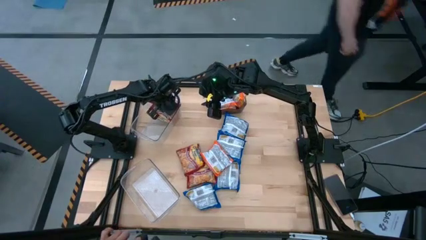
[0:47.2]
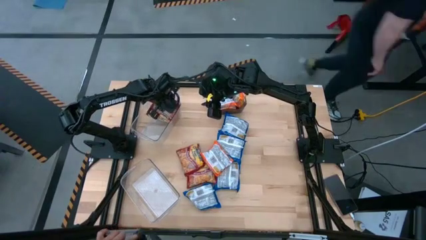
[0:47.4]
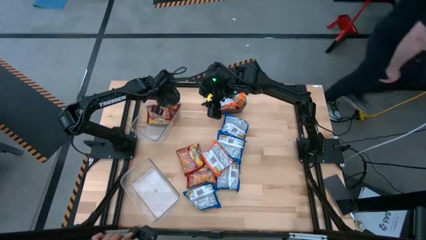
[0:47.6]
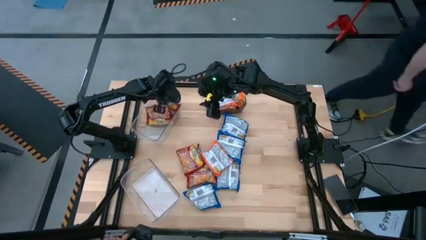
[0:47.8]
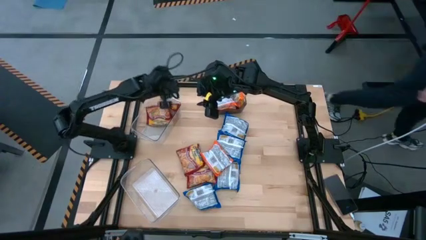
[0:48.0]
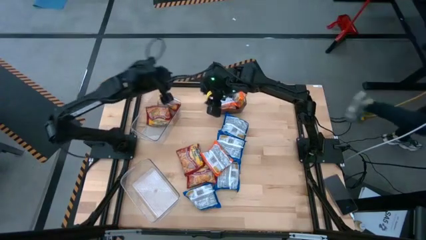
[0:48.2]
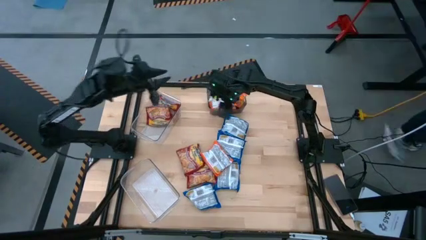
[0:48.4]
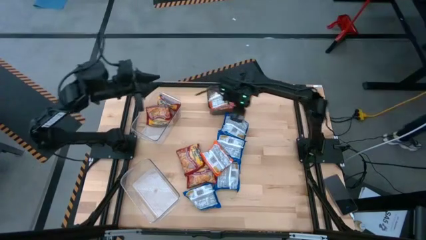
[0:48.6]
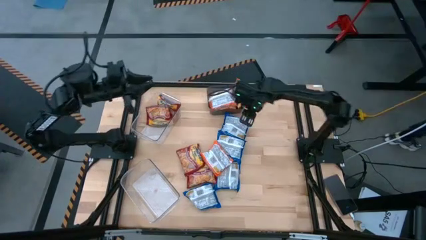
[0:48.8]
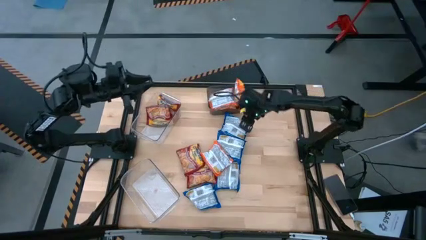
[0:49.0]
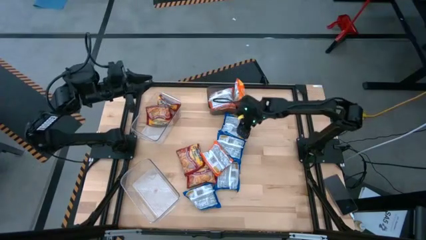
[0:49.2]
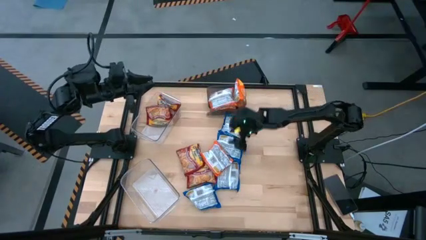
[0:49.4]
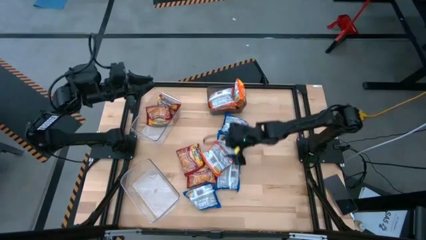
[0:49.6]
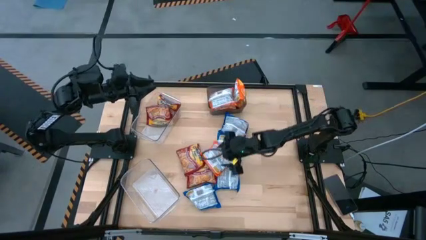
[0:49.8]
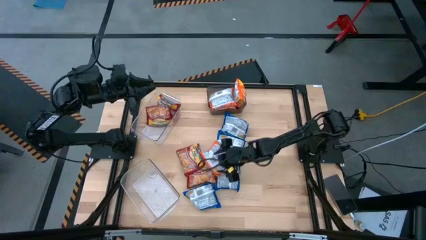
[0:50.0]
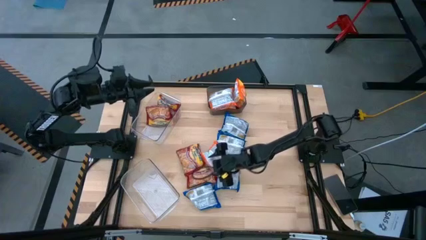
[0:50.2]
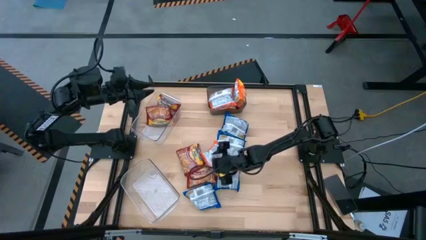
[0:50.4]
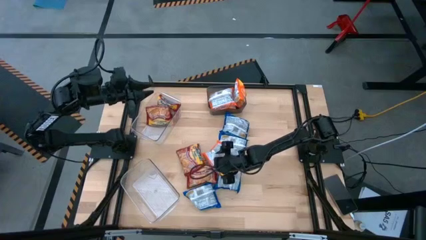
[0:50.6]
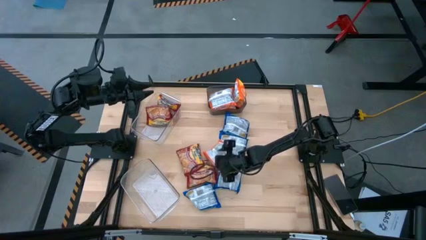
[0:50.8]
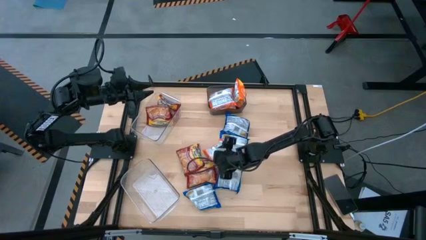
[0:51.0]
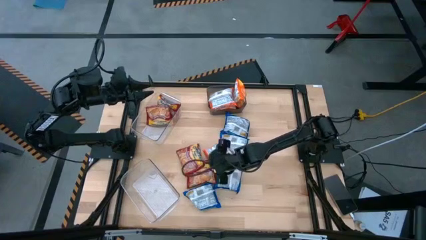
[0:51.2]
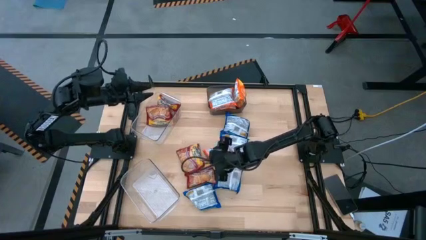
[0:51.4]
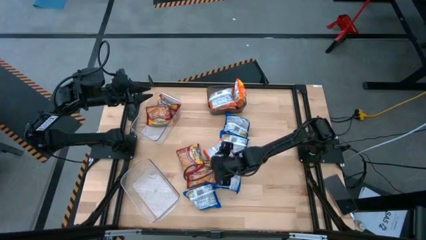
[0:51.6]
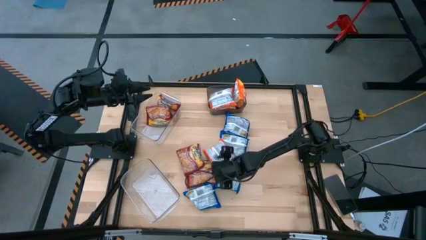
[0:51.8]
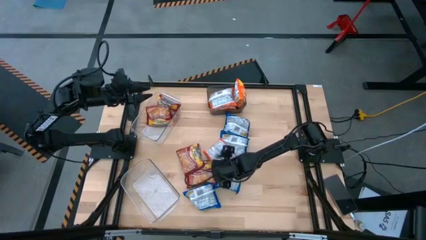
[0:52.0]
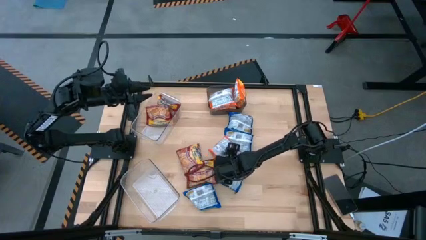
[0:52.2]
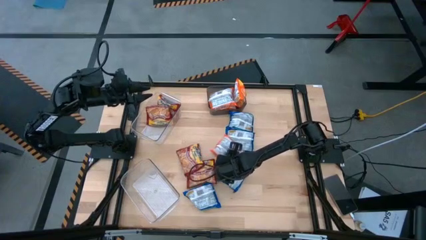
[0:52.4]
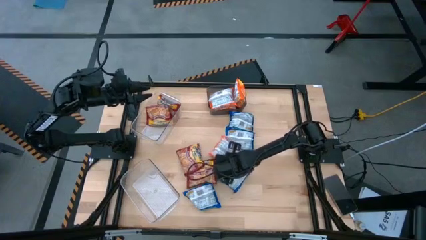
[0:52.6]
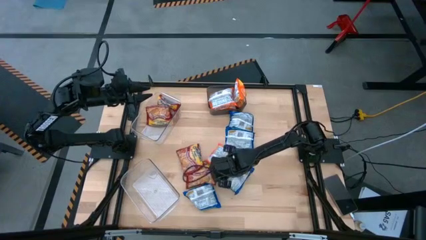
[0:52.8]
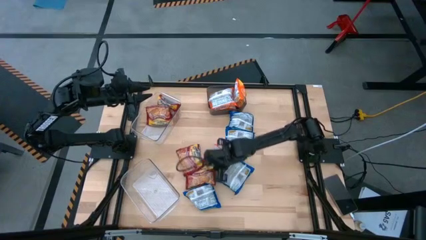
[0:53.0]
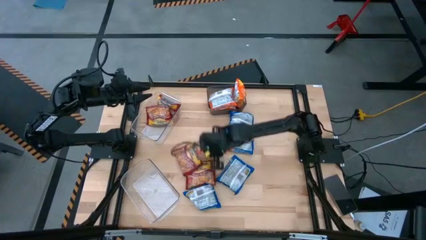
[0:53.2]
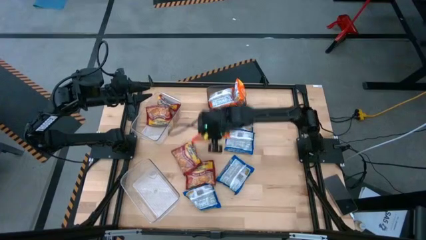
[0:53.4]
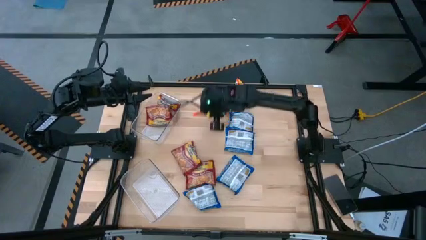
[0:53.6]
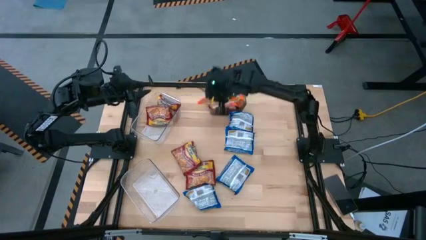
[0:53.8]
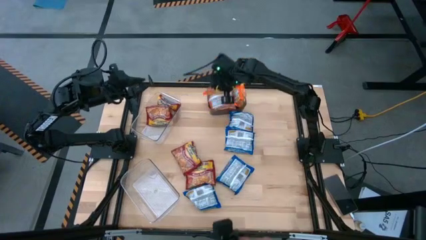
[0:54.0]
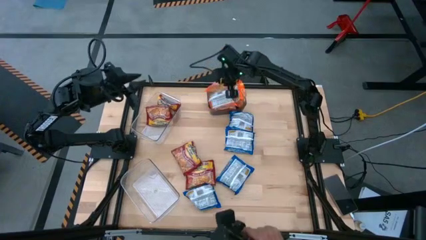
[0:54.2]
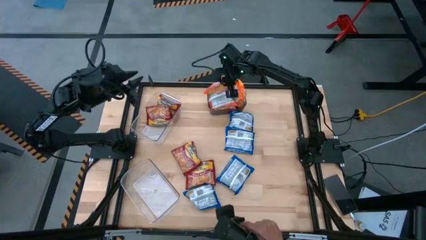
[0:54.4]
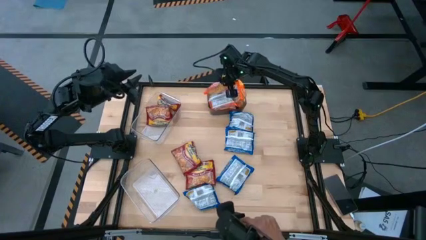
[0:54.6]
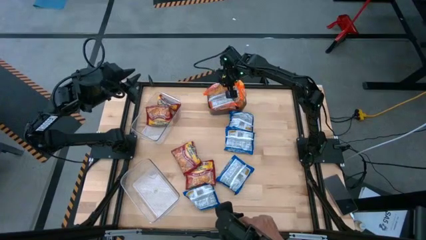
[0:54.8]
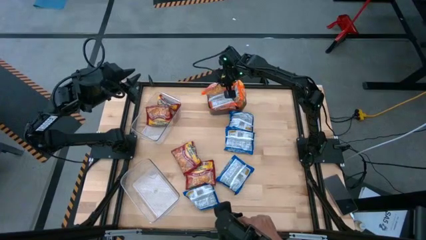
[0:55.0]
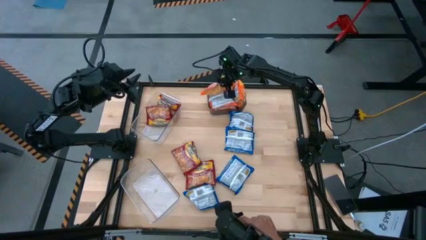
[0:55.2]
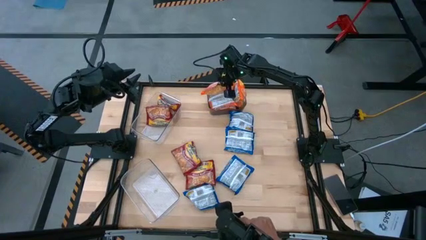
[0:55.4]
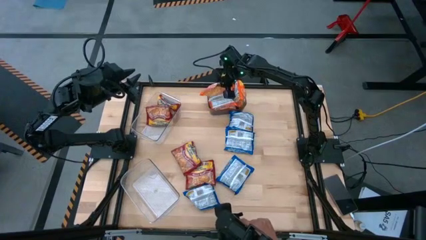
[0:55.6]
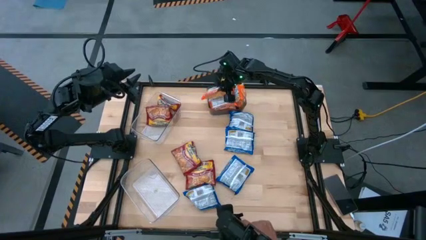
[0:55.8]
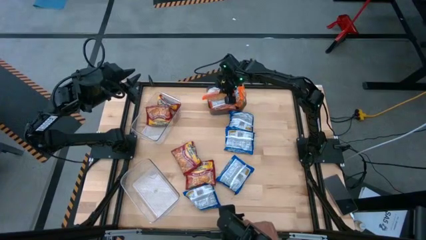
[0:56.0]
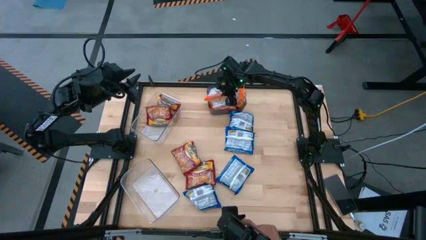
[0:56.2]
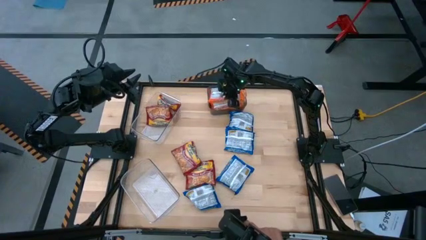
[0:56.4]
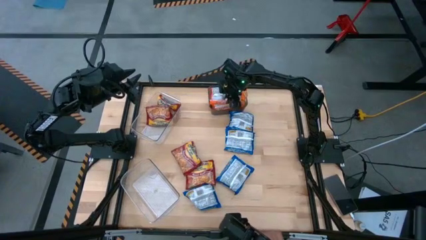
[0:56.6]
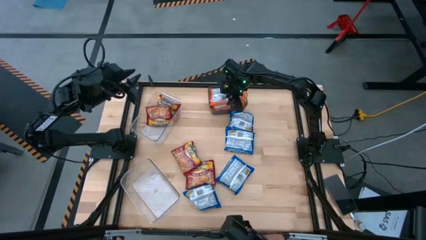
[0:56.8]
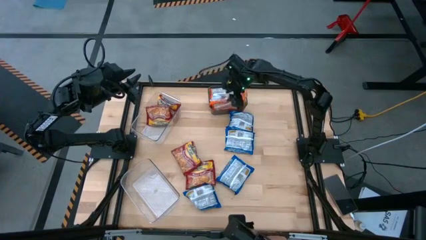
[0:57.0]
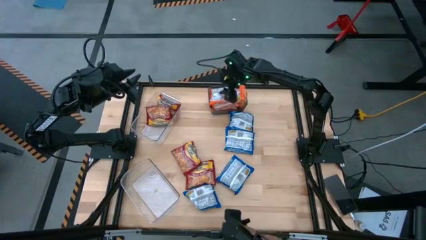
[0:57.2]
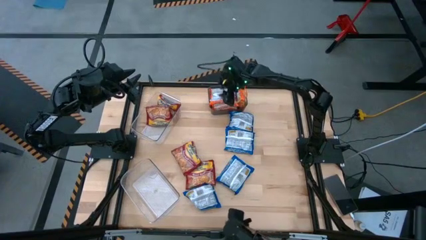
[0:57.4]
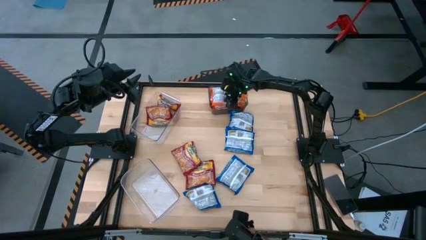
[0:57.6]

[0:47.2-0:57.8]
Task: Sort Maruchan noodles
Put the orange noodle pack into the black bin

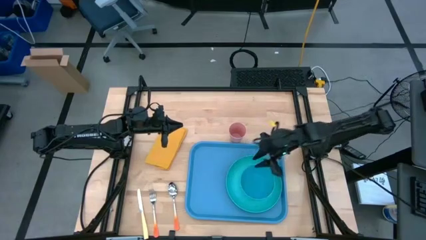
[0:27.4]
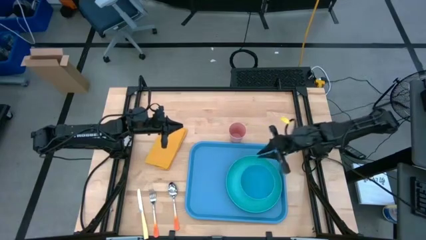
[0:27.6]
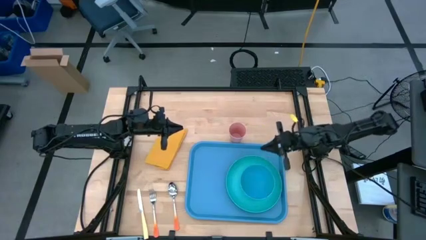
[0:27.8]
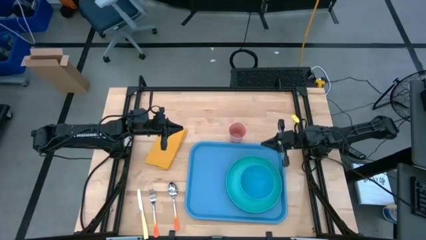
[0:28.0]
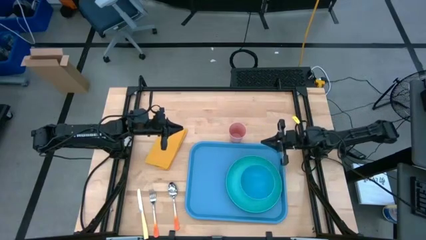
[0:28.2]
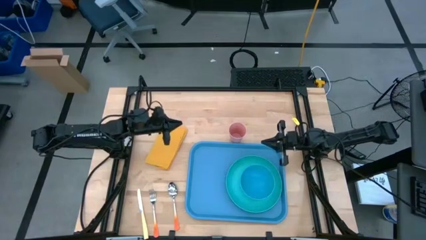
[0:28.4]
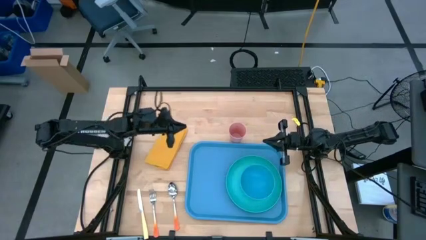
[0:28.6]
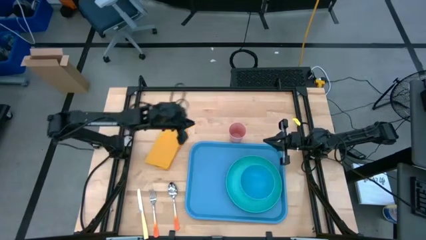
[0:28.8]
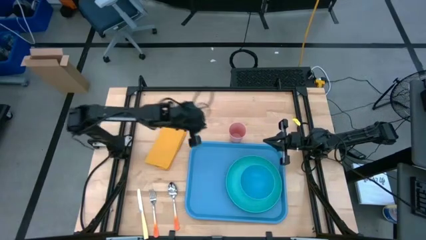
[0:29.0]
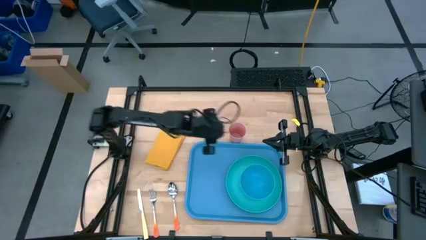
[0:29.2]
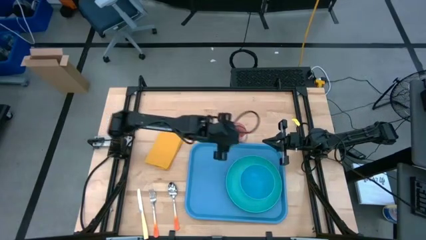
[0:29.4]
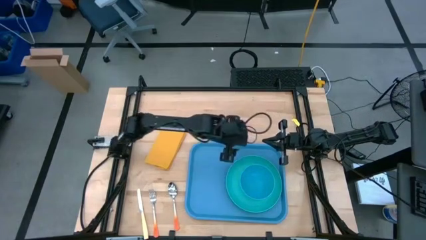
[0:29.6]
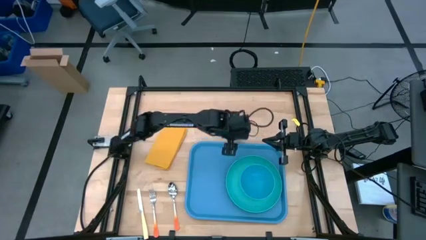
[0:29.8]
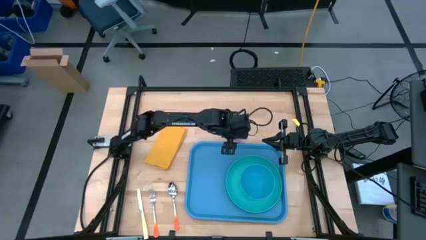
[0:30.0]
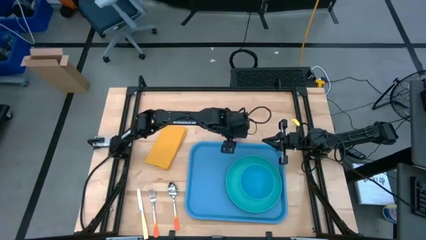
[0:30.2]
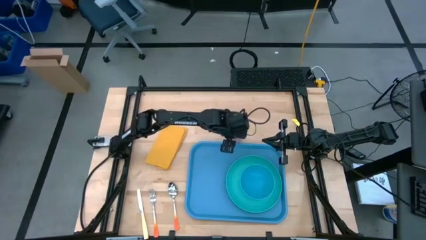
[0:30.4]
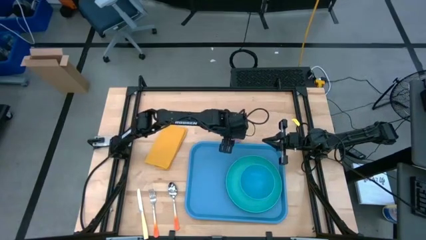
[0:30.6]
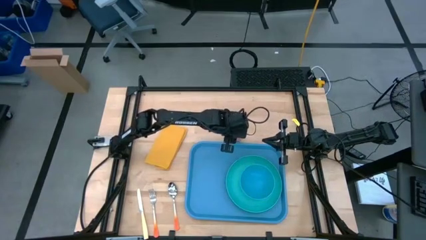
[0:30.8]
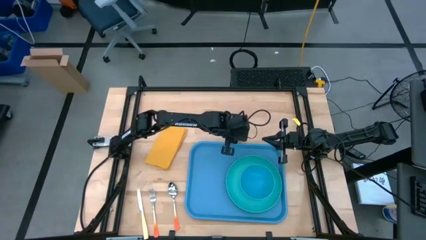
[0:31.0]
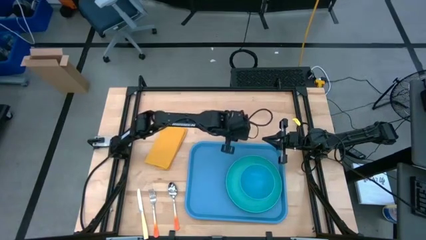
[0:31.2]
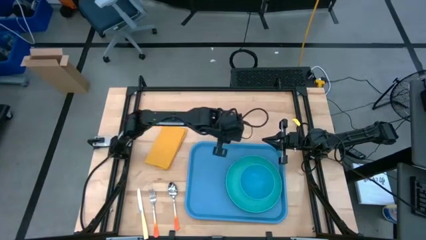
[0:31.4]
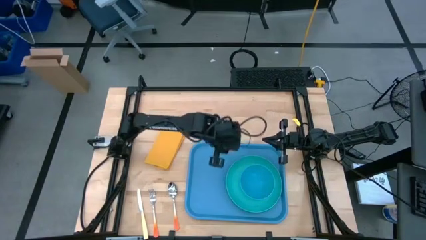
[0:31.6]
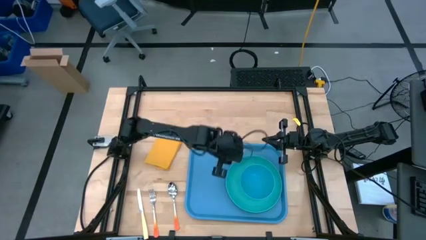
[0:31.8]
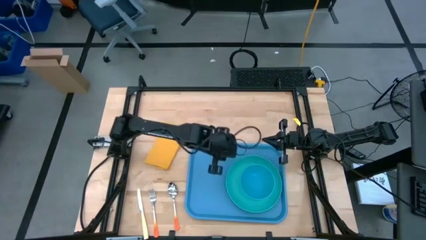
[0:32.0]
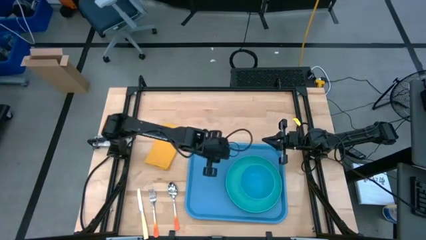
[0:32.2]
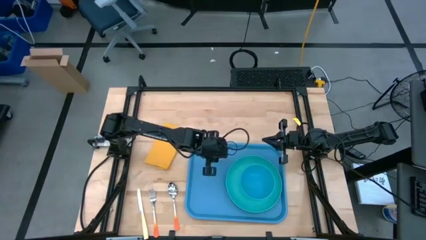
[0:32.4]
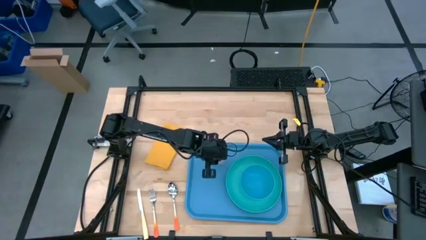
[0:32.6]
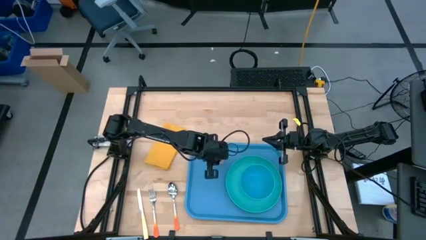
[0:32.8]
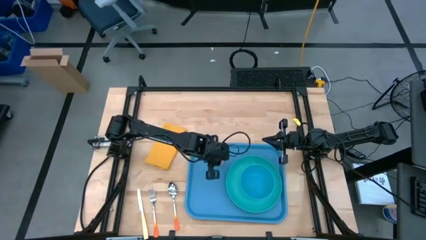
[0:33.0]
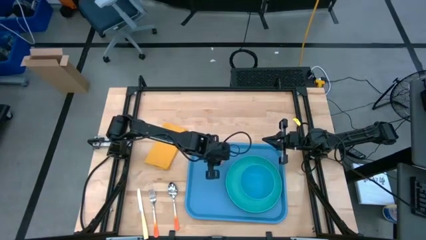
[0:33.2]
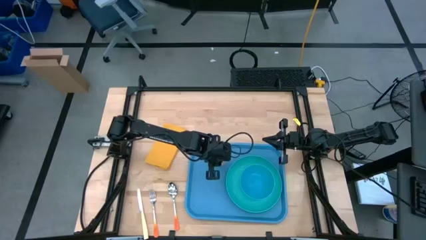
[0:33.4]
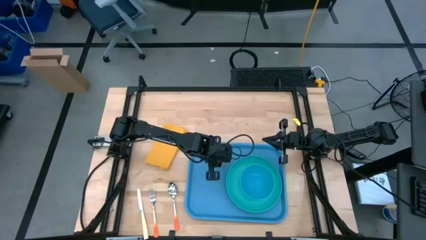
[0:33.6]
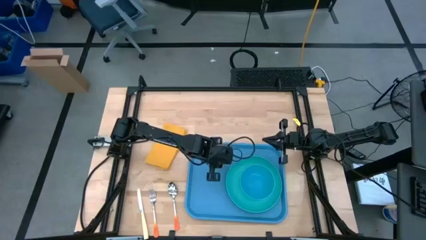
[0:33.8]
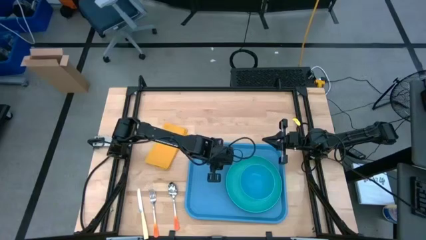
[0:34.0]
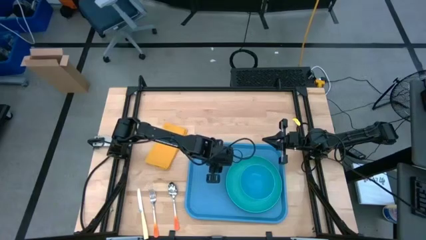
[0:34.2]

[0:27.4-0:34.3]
Task: Set up tray
Put the pink cup on the top of the blue tray
